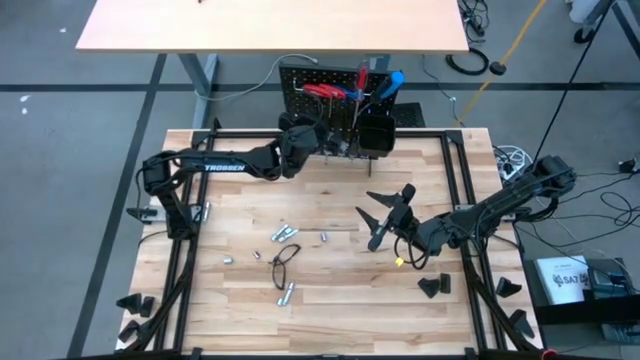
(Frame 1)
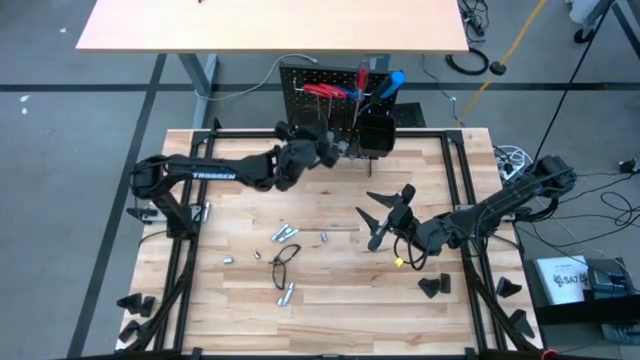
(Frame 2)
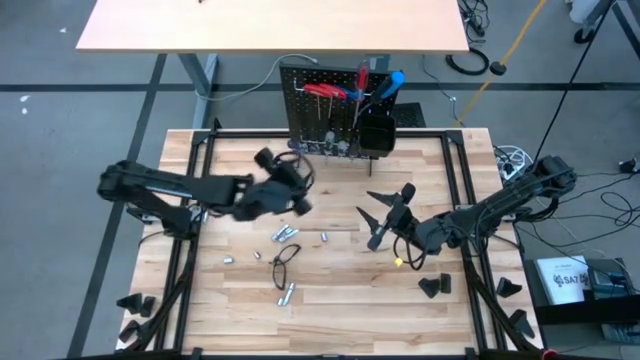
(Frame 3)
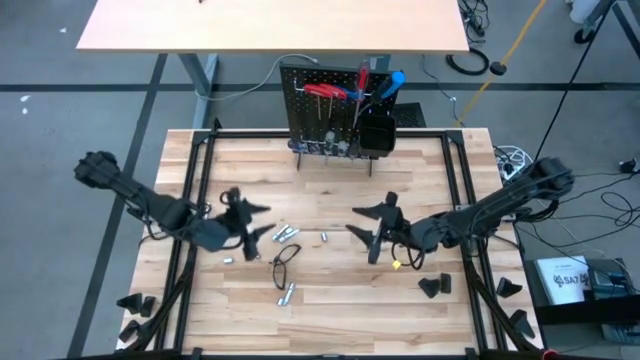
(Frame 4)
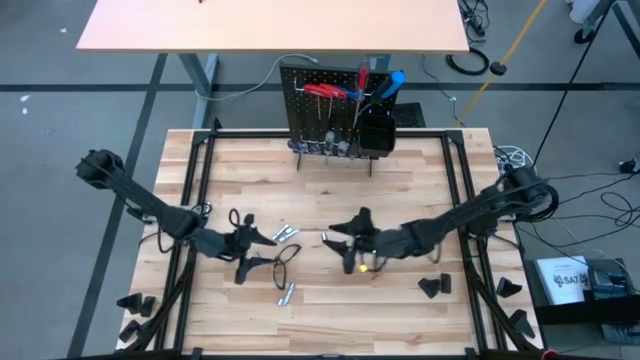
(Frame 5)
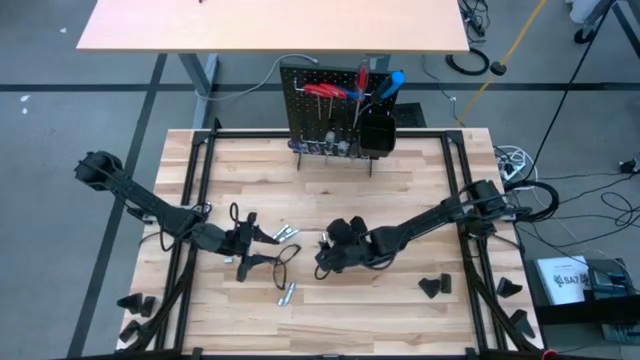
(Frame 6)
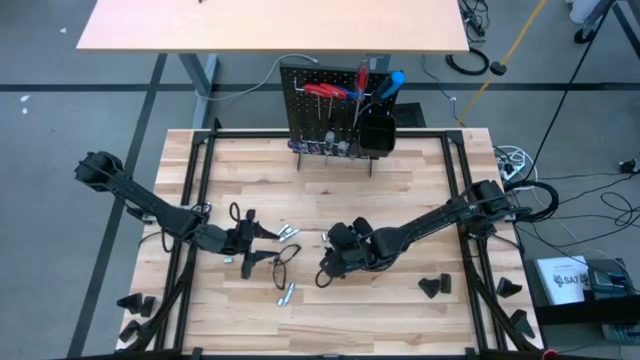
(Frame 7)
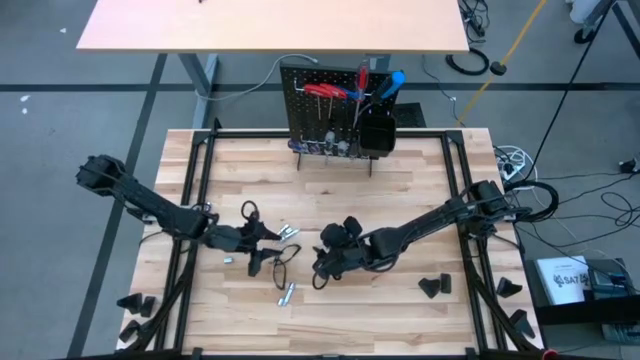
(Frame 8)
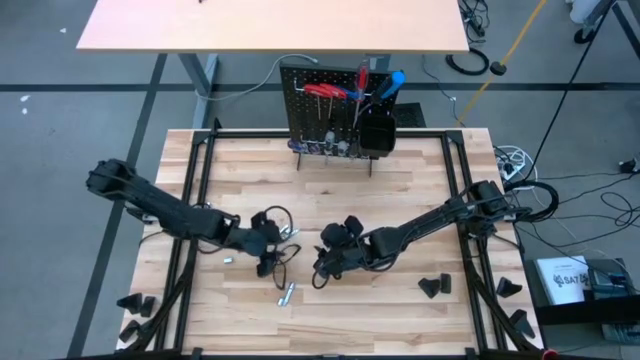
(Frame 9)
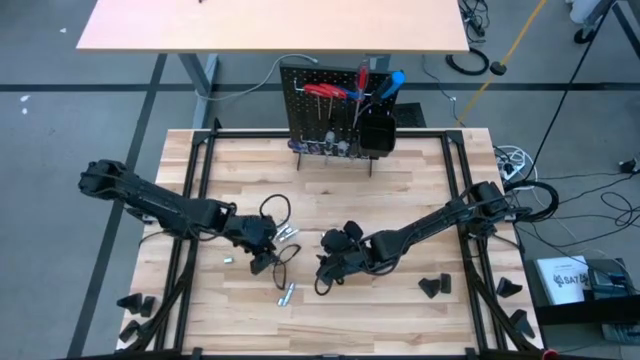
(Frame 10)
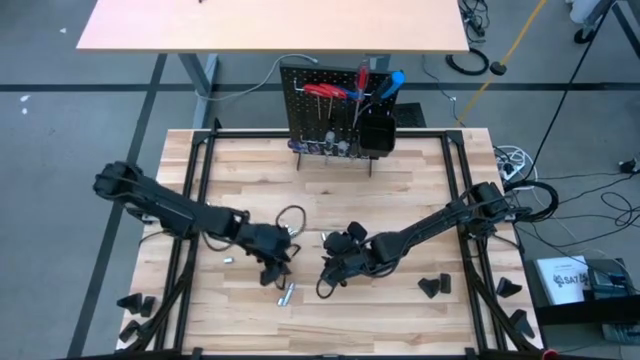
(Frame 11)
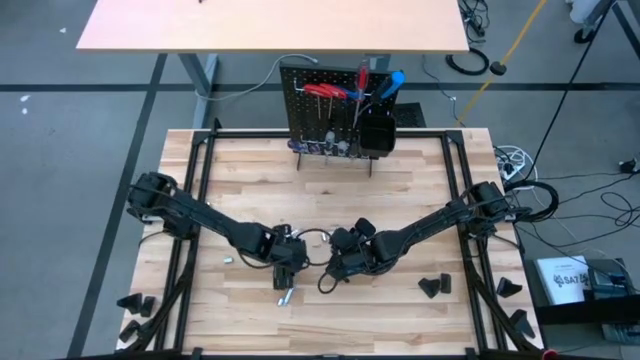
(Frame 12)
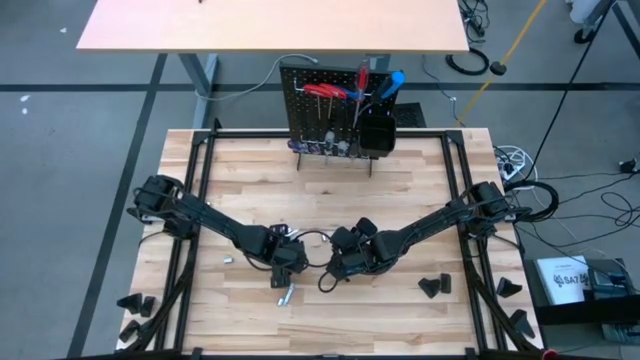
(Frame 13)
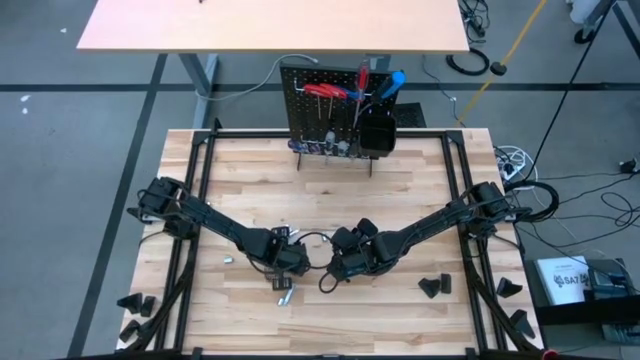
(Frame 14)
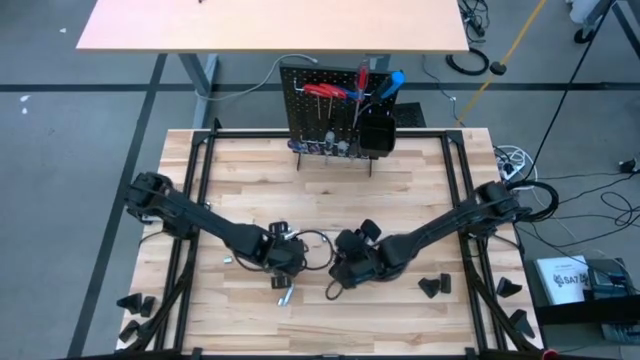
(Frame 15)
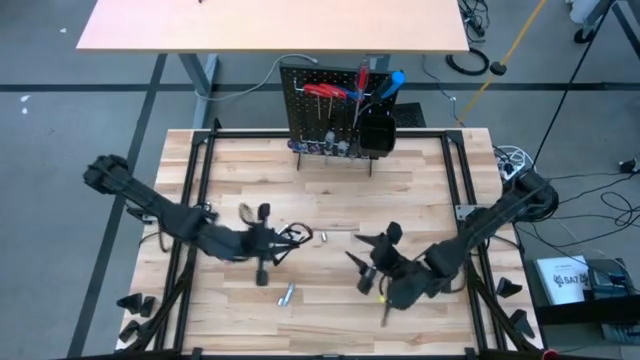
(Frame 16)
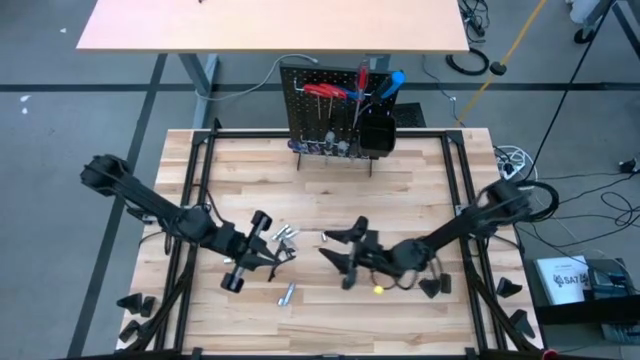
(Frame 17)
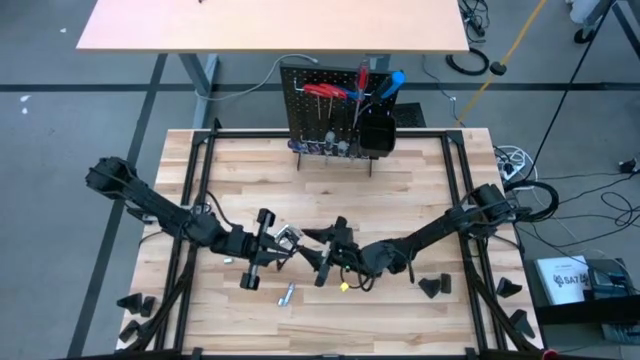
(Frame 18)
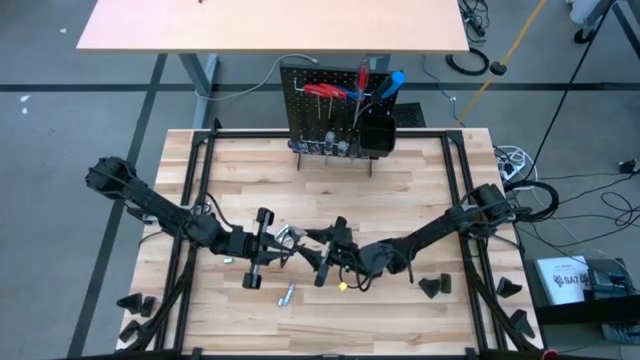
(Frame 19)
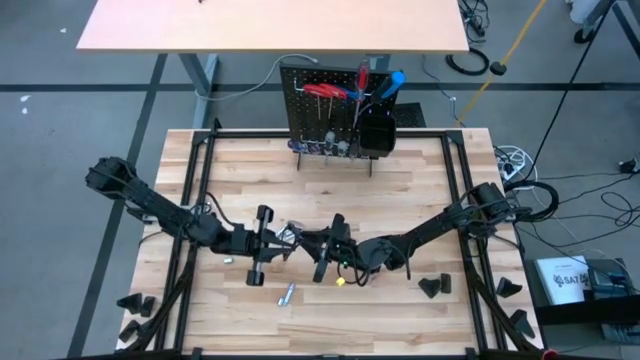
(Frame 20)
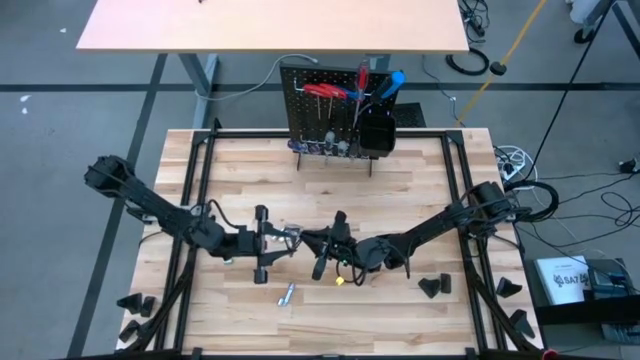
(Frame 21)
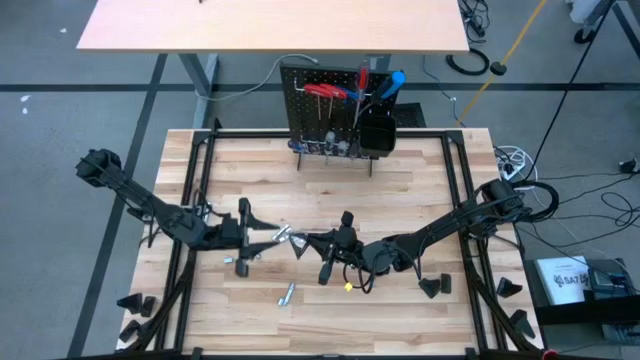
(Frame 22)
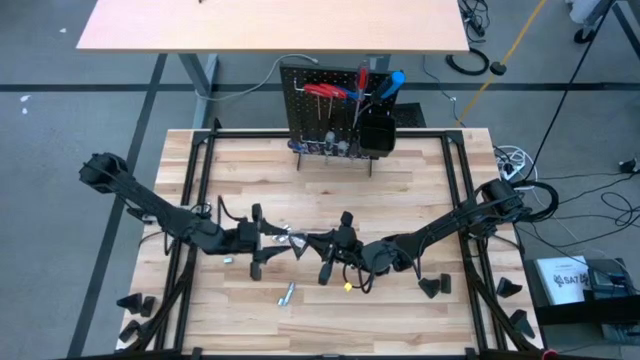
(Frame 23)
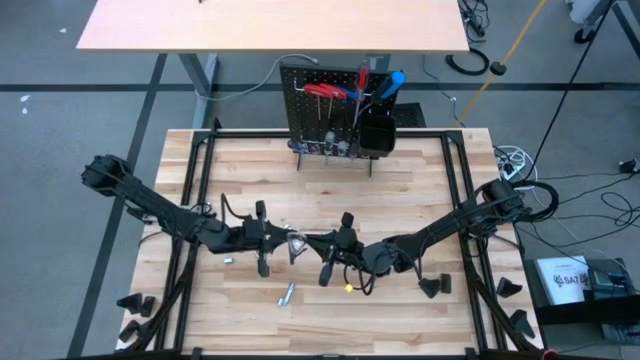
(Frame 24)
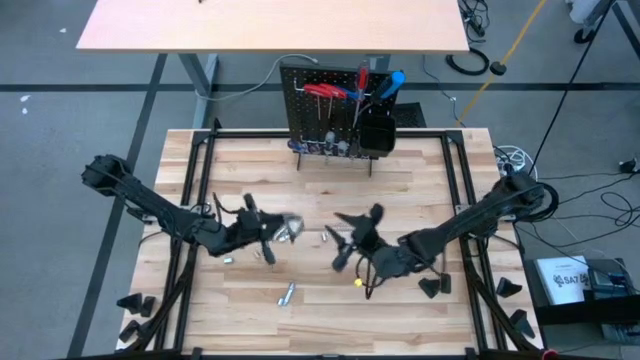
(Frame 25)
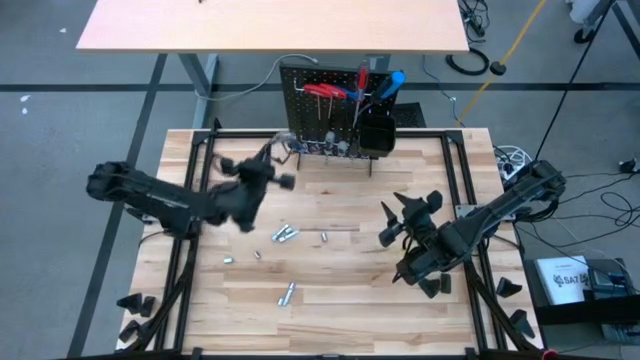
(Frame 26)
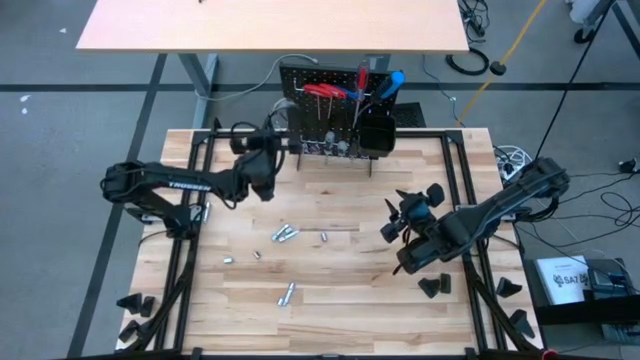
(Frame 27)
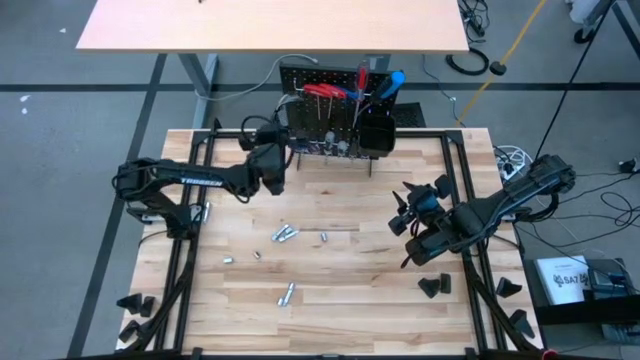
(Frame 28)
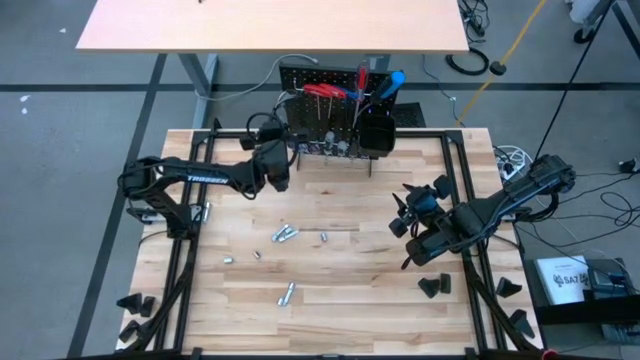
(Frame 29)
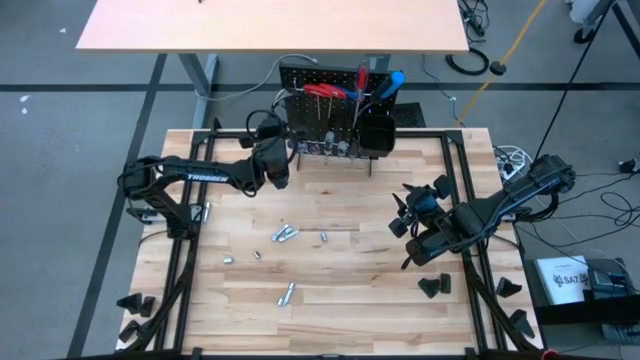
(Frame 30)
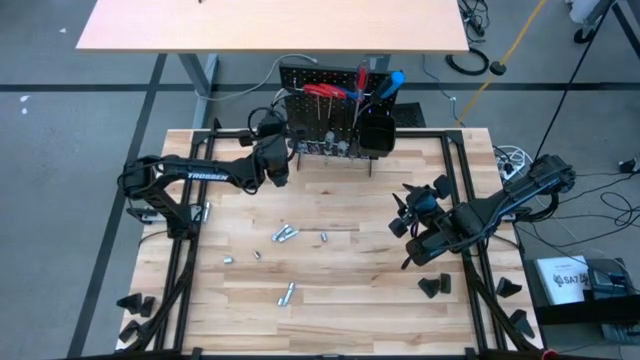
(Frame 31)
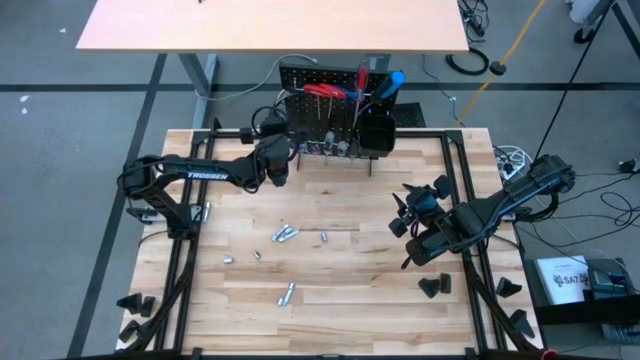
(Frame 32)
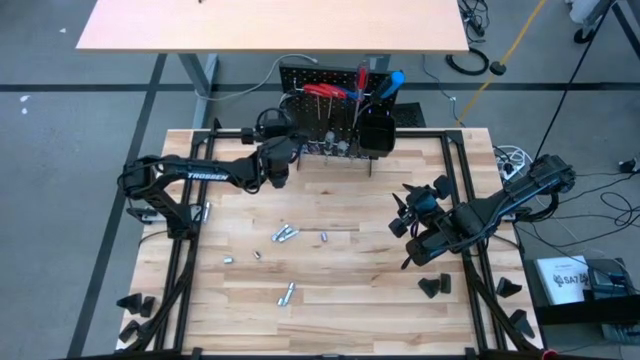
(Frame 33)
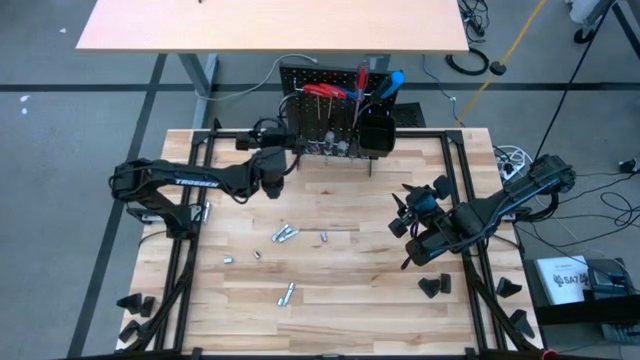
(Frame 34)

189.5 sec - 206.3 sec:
Task: Hang tools onto peg board
Hang the black safety glasses onto the peg board

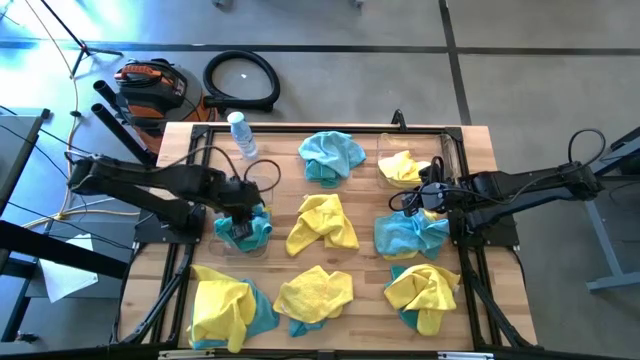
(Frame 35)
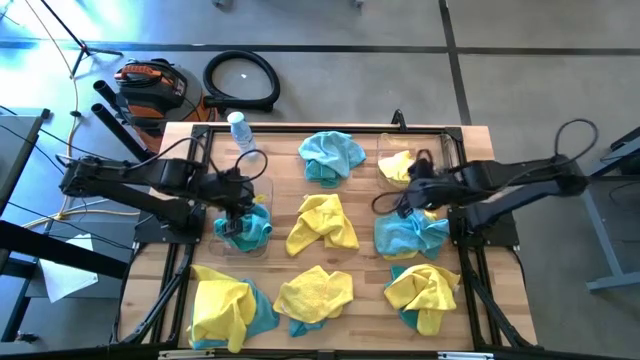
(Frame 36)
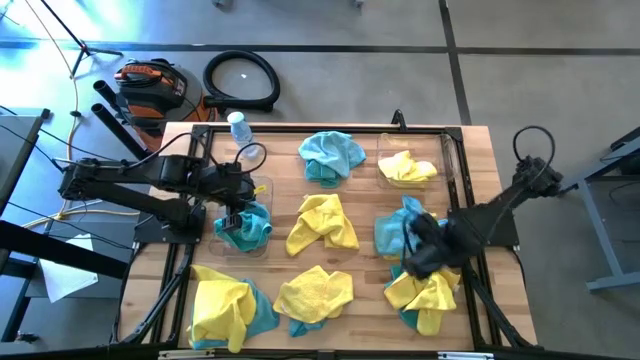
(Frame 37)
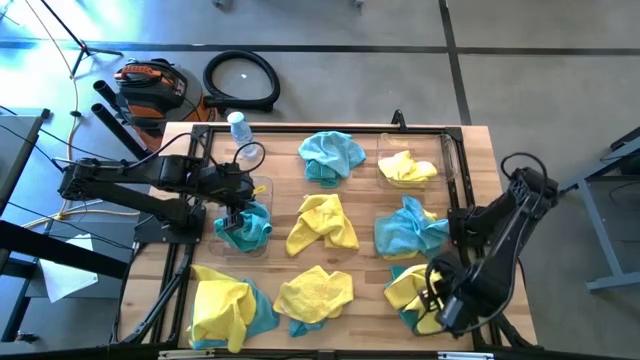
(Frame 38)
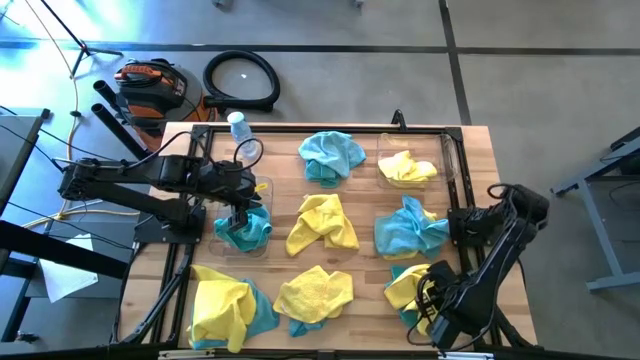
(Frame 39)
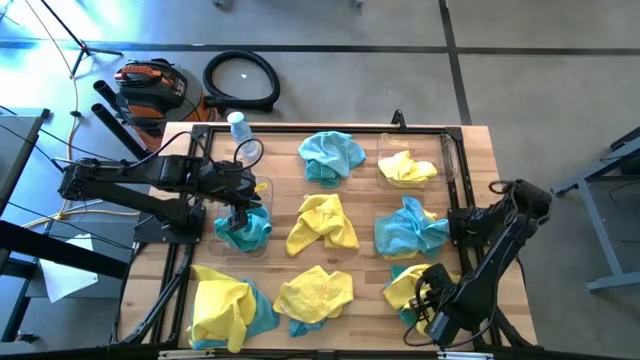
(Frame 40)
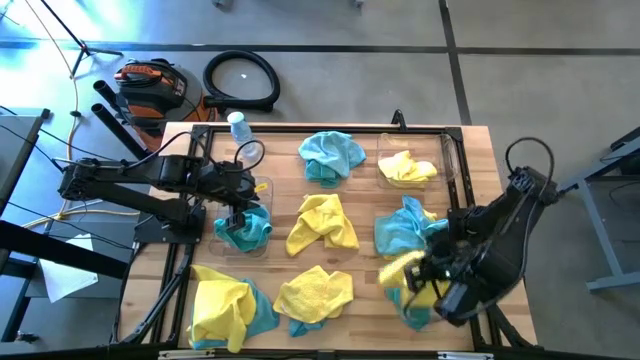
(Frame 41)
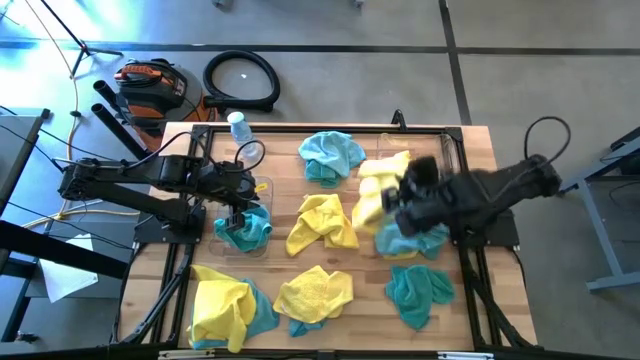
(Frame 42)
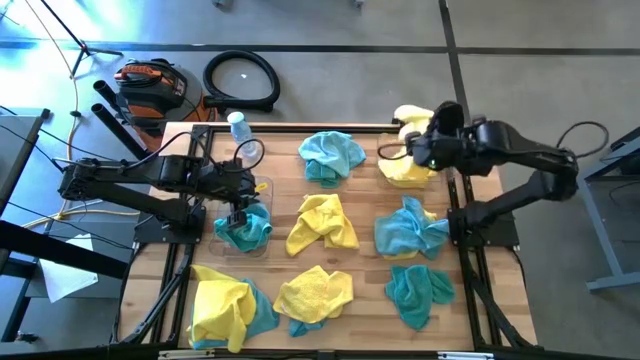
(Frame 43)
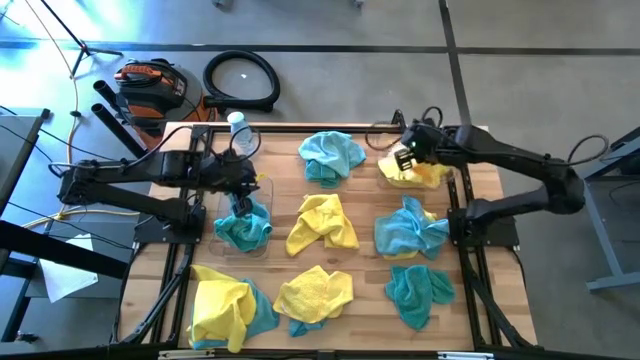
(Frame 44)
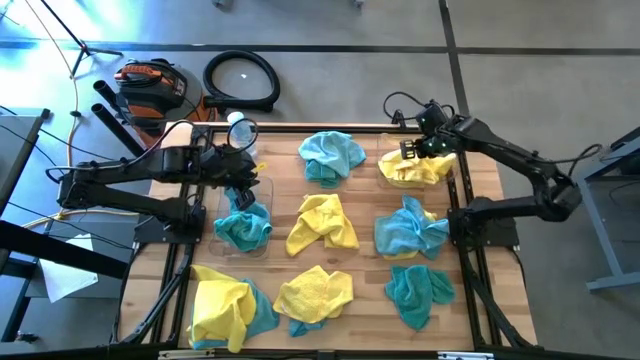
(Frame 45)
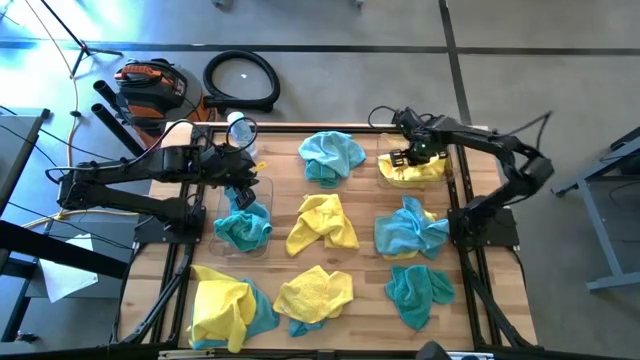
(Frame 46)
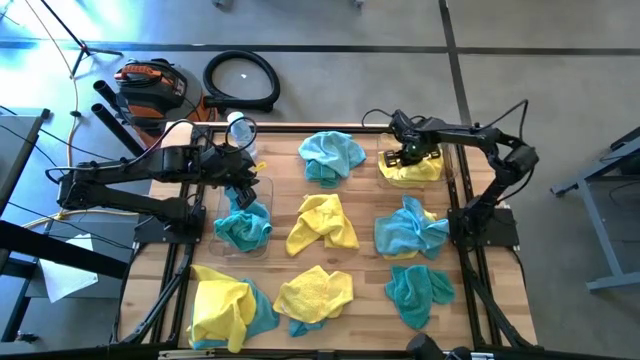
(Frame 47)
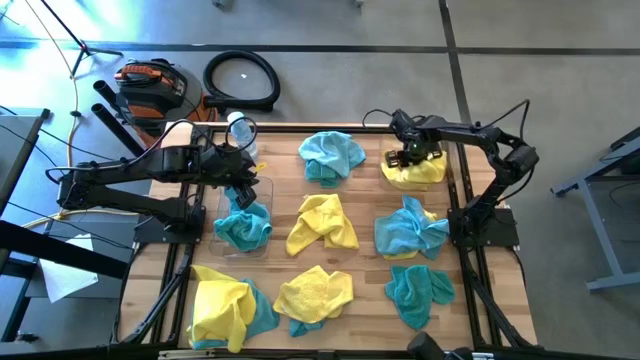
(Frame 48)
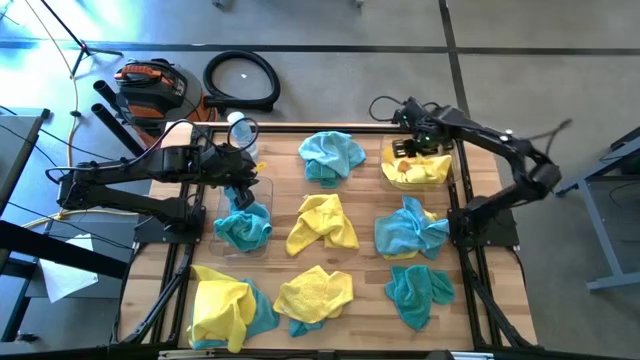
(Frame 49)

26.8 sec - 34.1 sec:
Task: Sort microfiber towel by color & place in baskets
Put the yellow microfiber cloth into the right transparent bin
